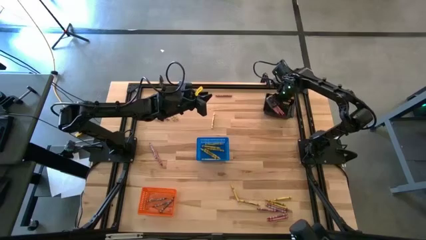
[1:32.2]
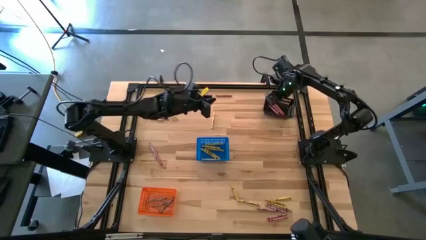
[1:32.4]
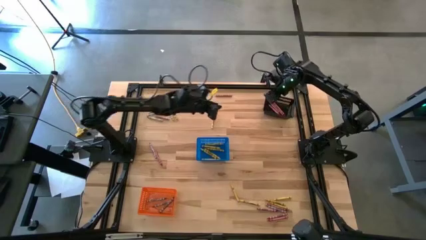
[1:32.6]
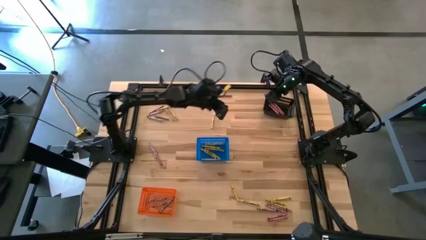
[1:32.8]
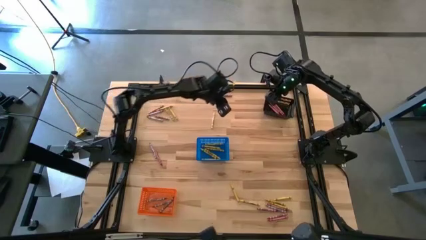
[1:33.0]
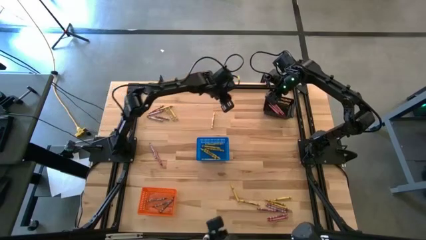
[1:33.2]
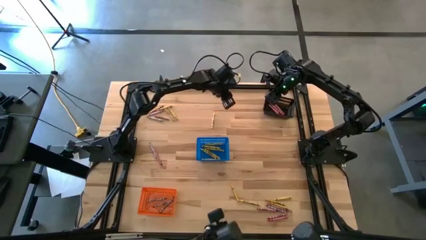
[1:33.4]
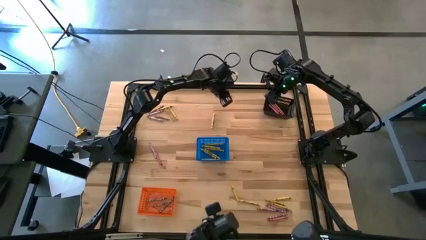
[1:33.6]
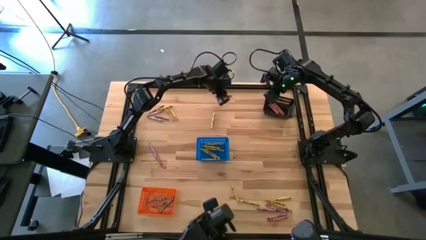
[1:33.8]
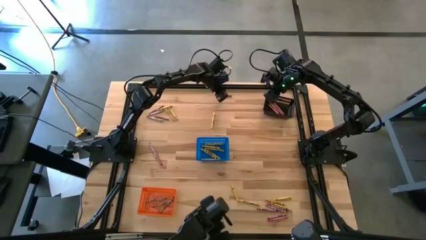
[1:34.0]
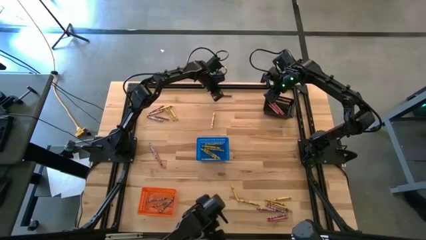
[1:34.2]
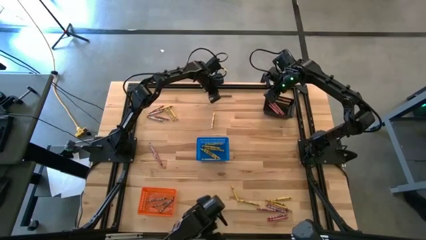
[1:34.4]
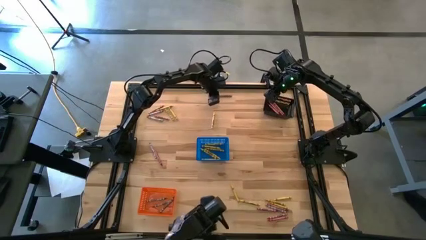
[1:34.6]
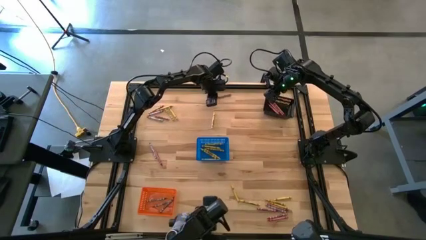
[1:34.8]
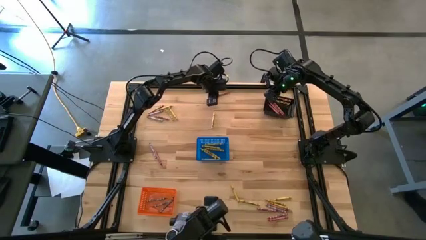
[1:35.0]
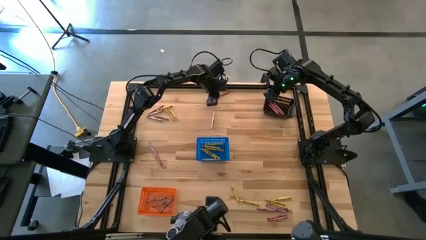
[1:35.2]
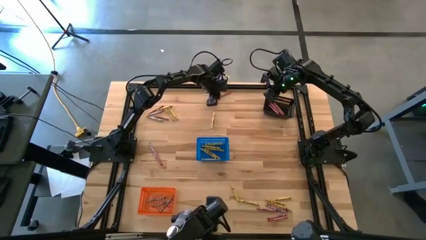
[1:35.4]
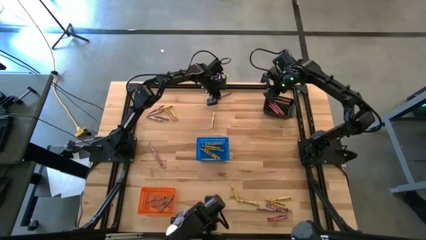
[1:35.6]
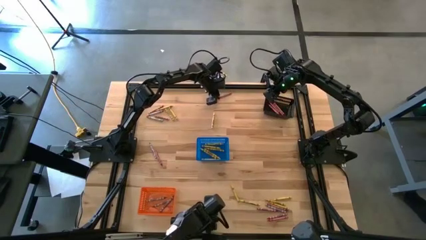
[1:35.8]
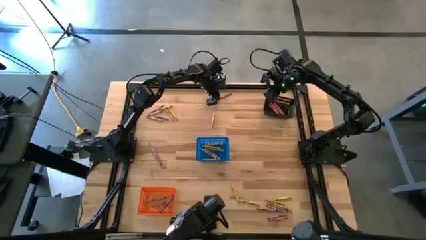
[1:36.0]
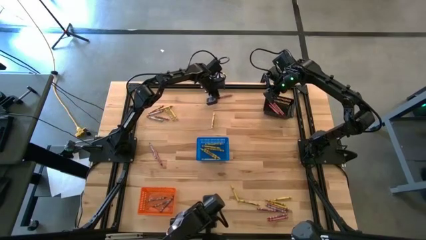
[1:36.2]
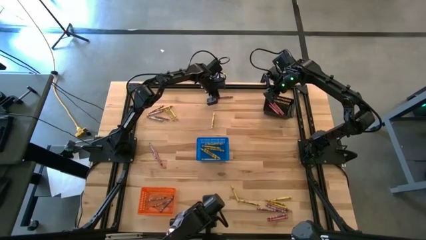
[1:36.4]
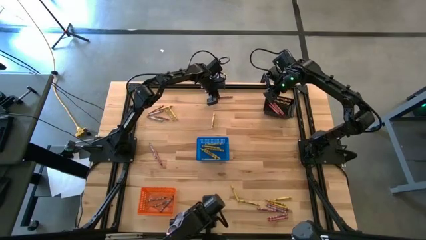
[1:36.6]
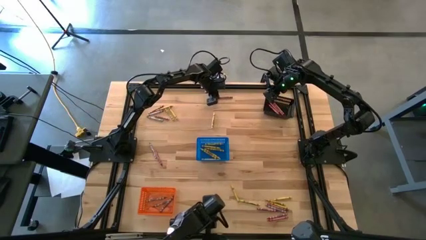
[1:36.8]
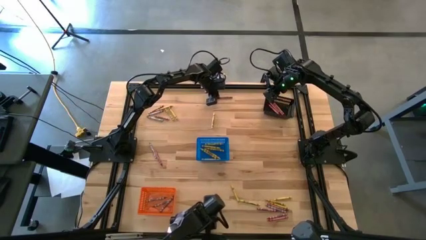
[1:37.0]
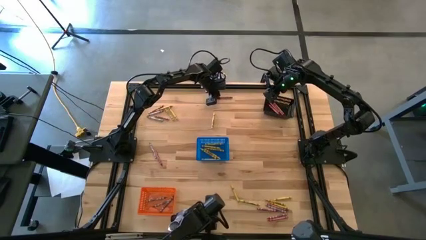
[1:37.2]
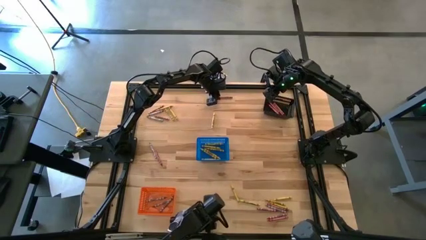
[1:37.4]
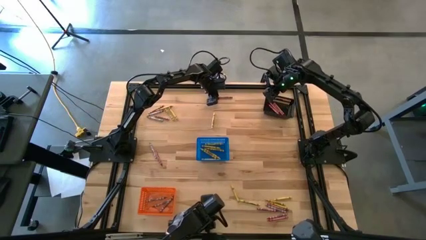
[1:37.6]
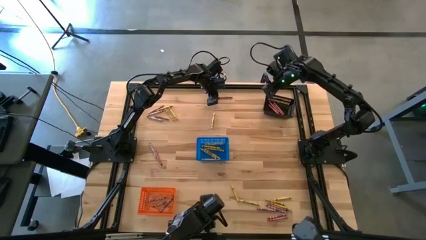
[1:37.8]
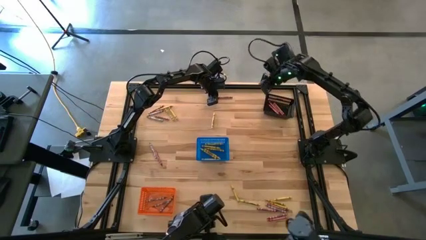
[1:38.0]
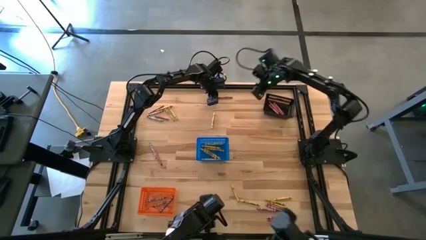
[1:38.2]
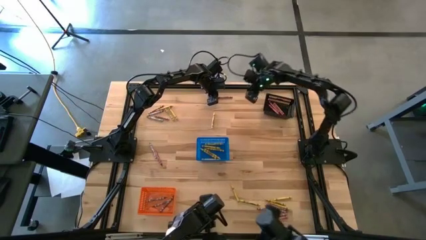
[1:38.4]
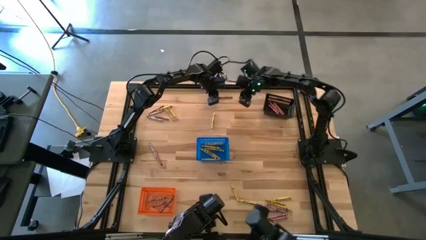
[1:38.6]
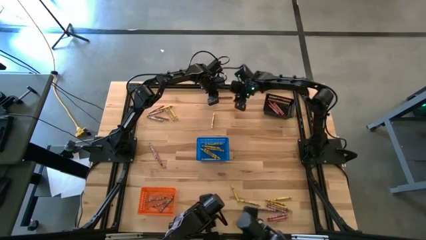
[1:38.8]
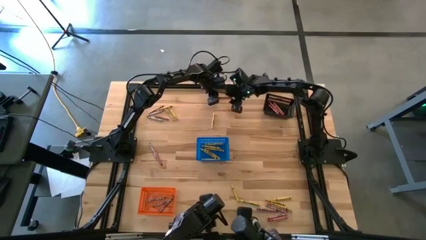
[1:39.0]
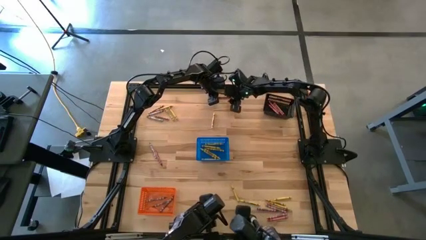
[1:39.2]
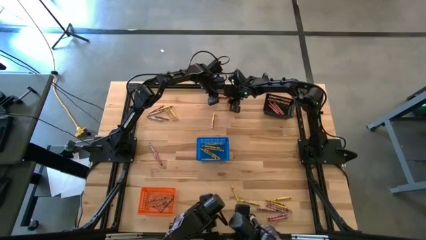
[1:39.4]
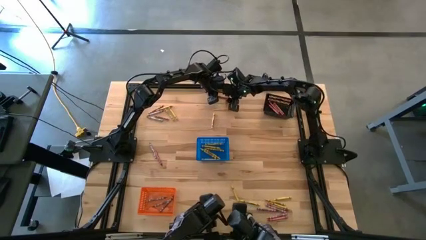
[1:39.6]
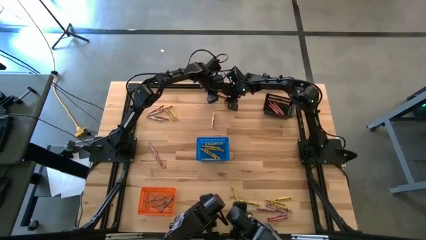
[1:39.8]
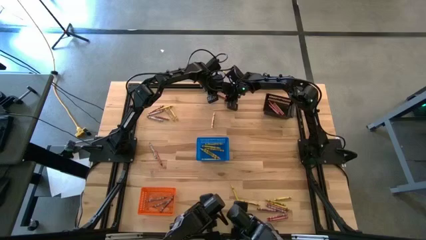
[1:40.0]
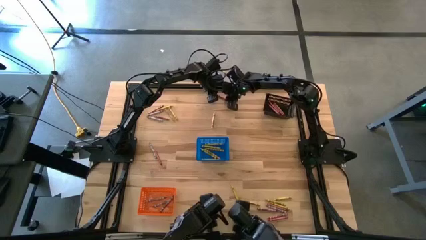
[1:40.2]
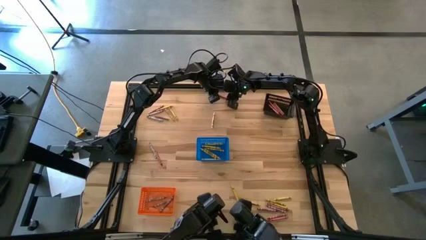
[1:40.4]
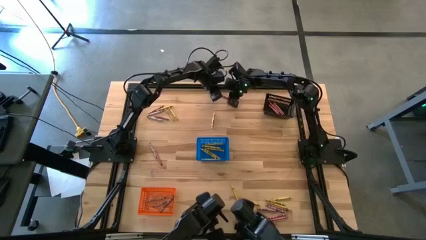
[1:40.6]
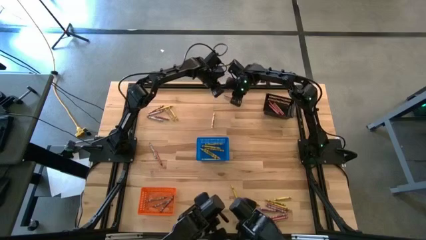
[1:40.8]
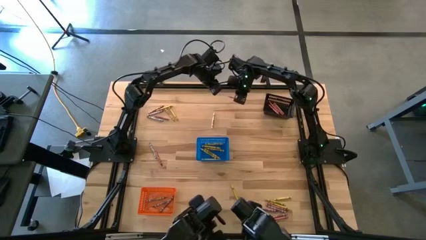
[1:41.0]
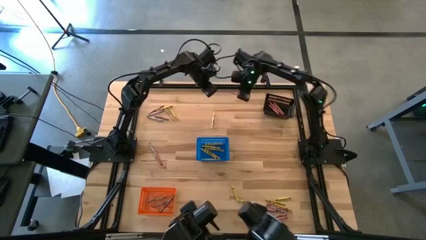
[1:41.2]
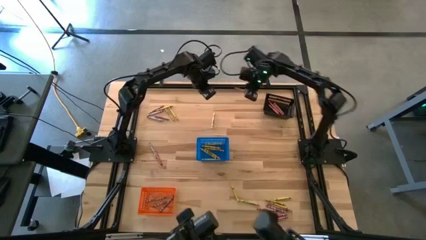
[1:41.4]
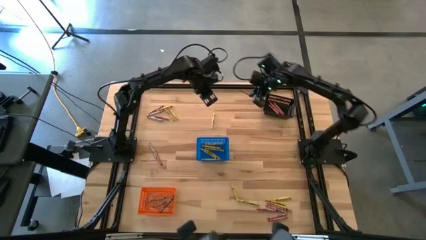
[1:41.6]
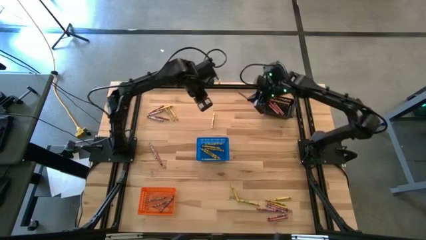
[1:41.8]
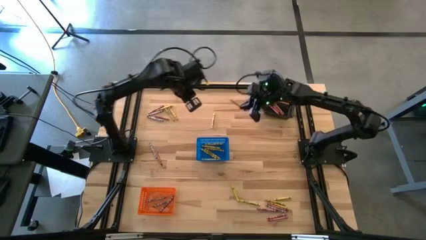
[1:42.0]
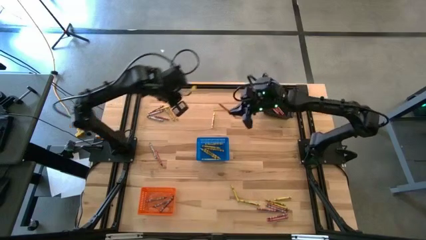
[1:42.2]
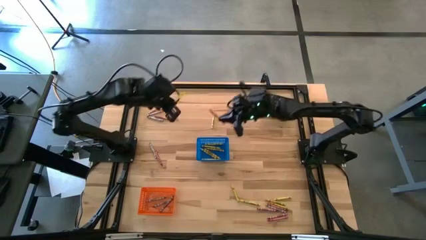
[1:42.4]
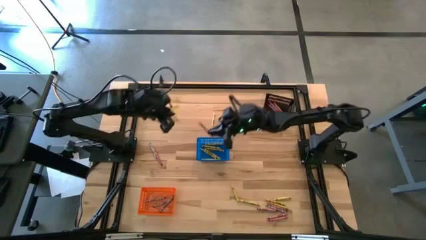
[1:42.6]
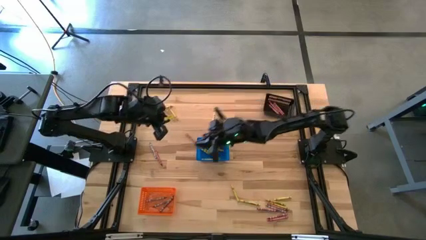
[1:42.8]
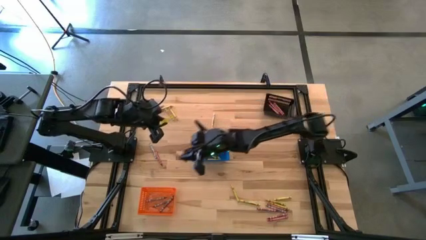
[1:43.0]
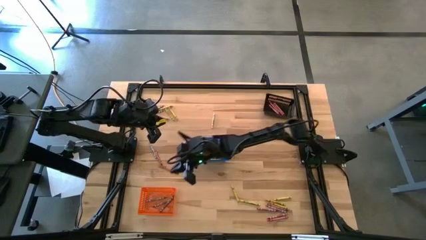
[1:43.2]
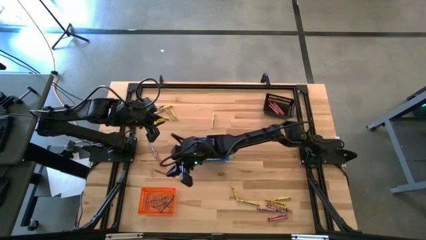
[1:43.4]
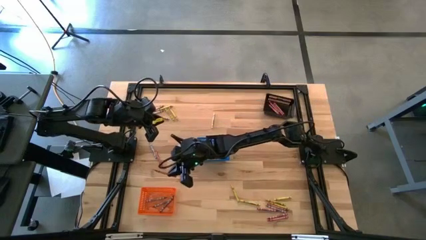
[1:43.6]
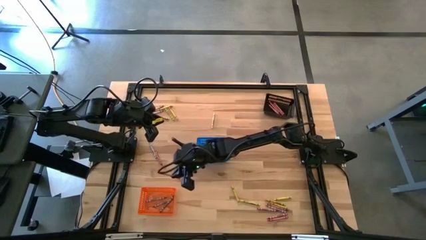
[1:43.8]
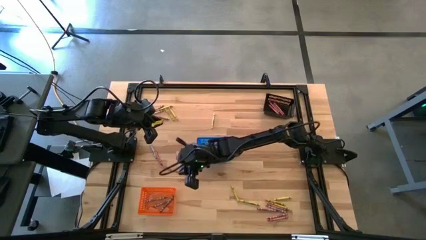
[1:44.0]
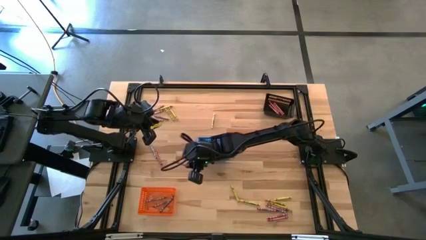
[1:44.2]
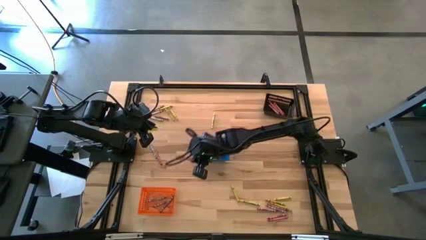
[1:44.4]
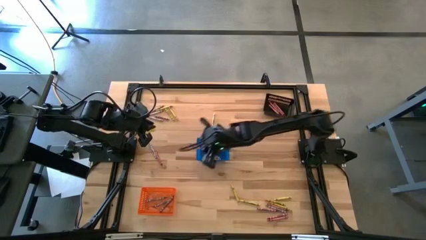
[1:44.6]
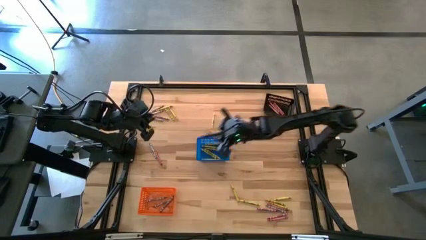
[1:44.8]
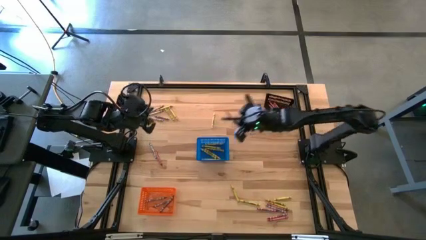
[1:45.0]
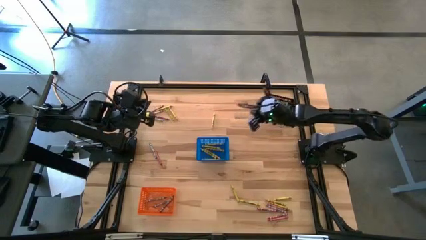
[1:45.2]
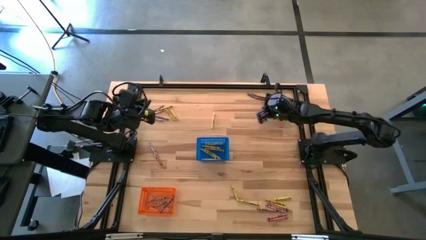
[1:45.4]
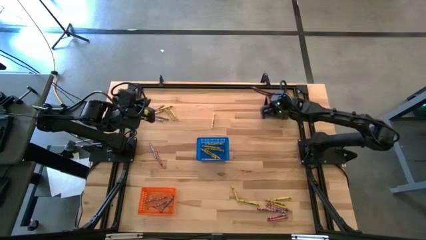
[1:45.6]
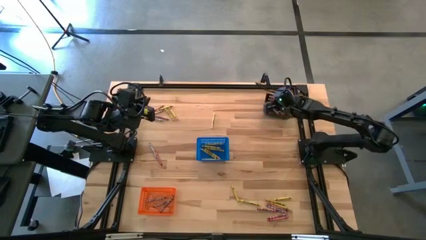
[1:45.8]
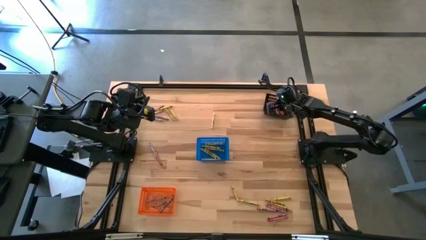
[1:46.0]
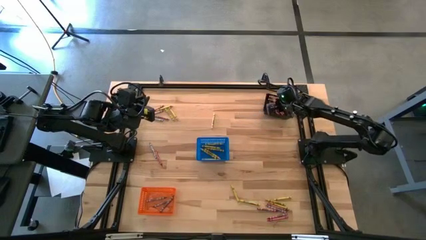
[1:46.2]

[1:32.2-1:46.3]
Task: Sort crayons
Put the red crayon into the black basket

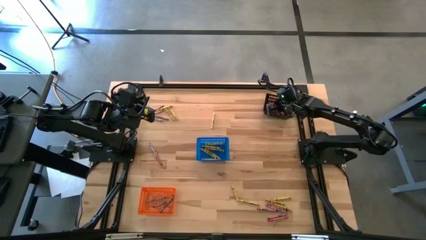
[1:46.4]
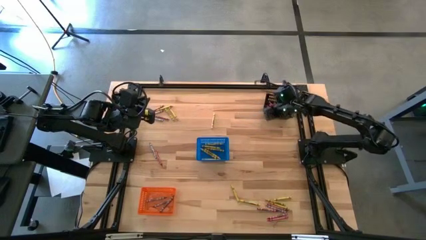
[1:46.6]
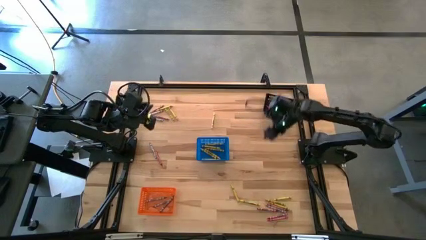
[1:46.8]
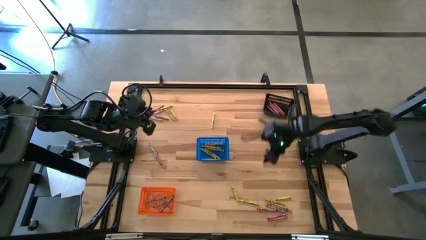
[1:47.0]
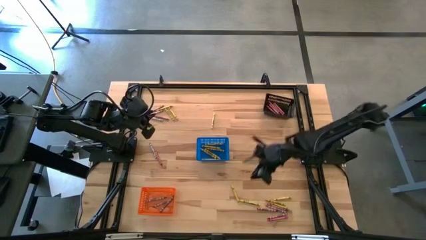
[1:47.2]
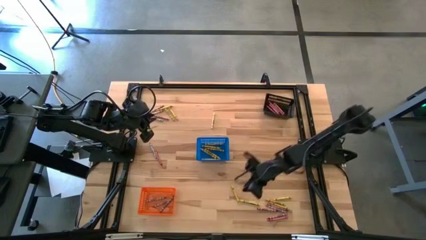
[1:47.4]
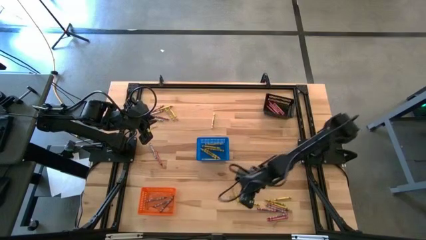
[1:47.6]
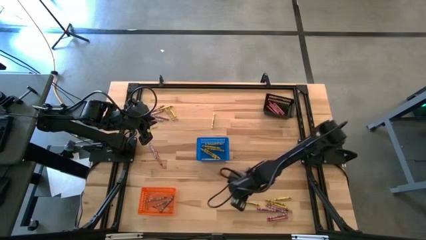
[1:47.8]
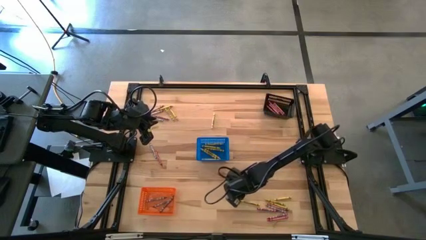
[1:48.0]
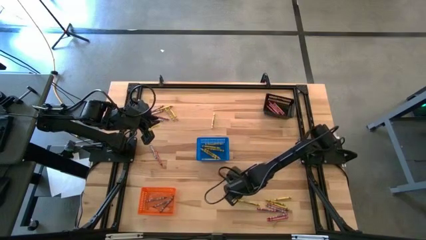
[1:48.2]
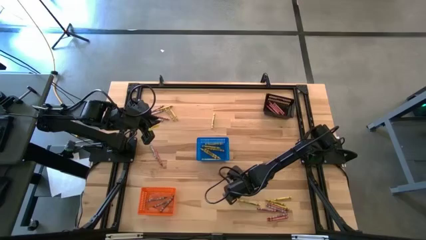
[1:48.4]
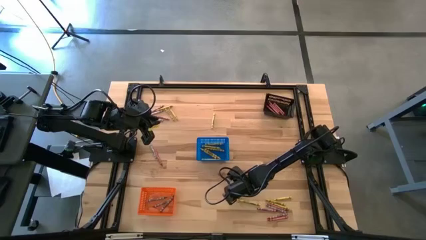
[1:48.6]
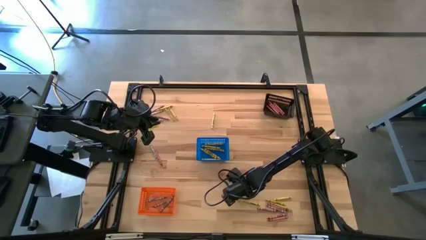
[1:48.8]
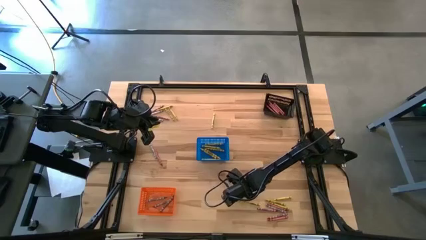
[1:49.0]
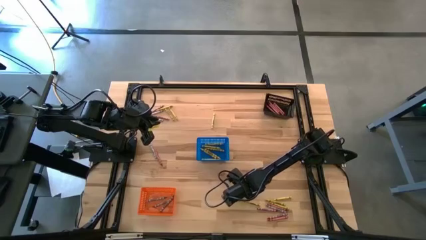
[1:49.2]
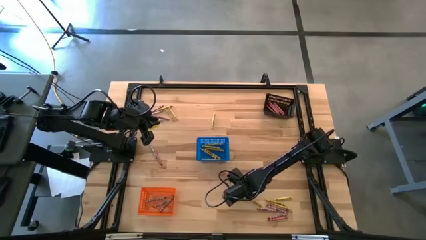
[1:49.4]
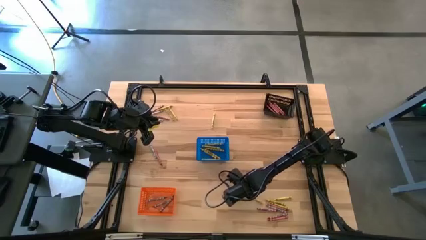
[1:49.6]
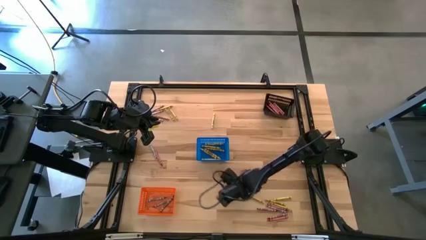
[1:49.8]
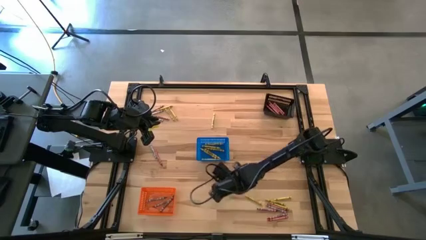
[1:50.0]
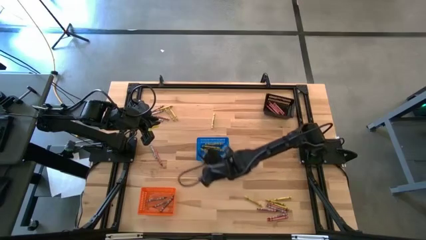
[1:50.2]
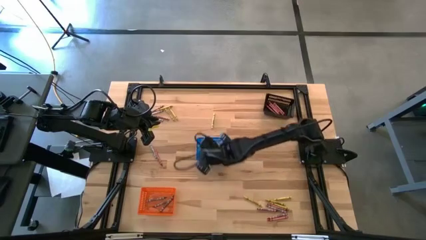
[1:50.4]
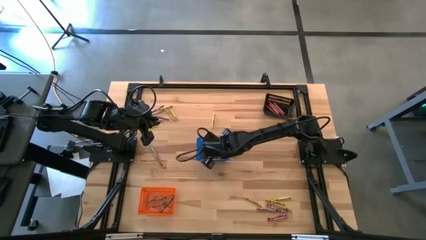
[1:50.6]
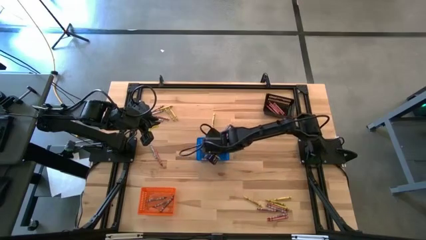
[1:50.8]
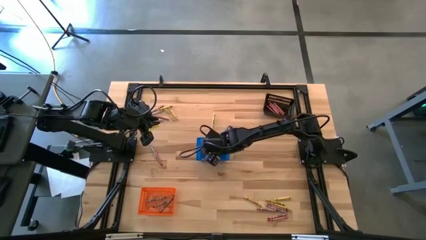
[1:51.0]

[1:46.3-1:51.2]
Put the yellow crayon into the blue basket
